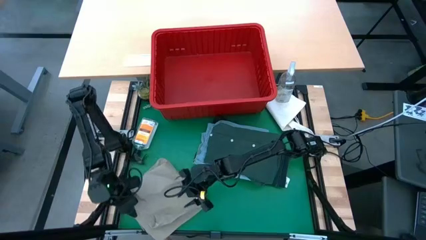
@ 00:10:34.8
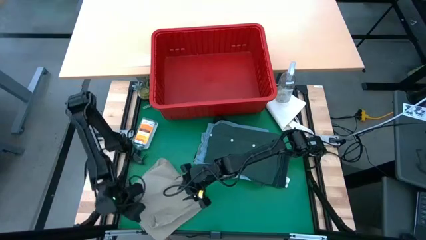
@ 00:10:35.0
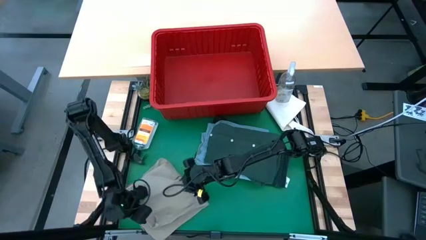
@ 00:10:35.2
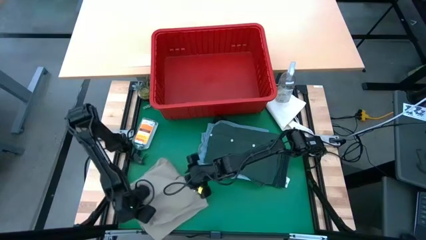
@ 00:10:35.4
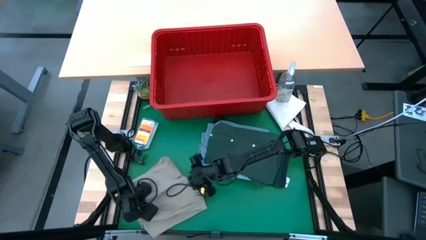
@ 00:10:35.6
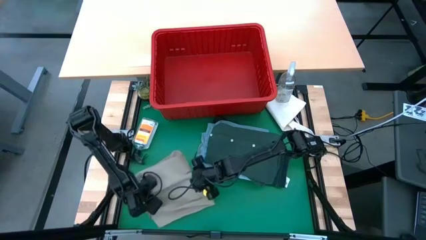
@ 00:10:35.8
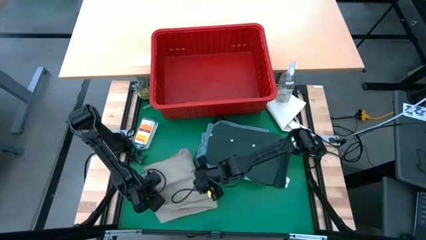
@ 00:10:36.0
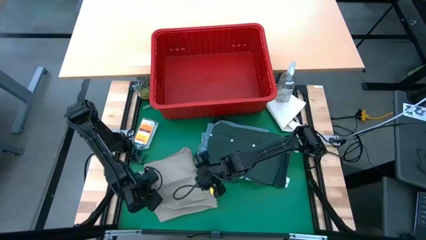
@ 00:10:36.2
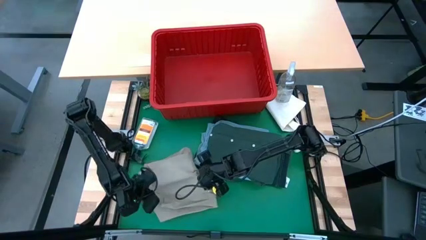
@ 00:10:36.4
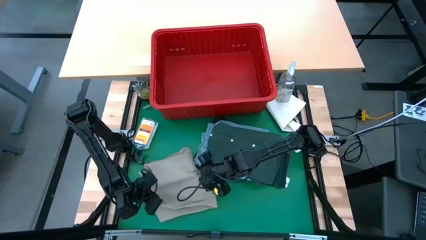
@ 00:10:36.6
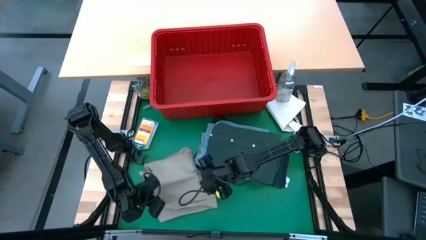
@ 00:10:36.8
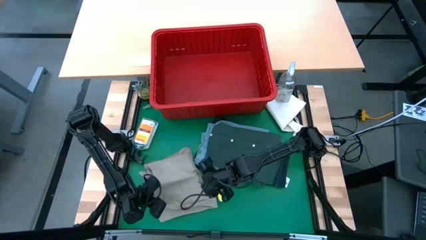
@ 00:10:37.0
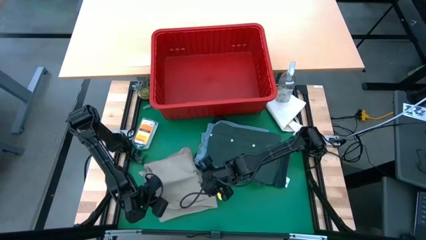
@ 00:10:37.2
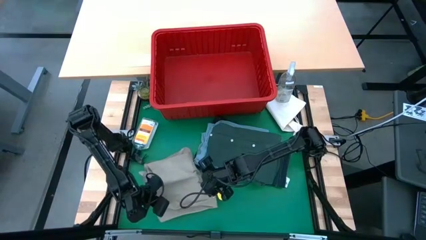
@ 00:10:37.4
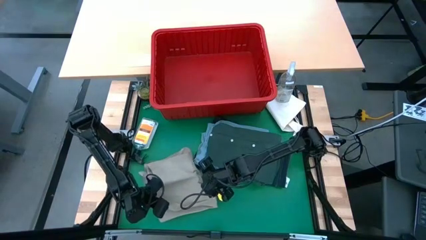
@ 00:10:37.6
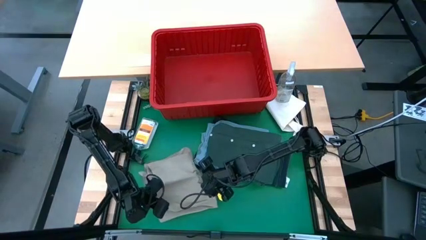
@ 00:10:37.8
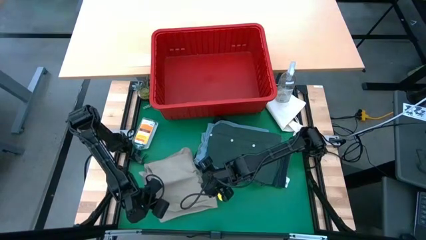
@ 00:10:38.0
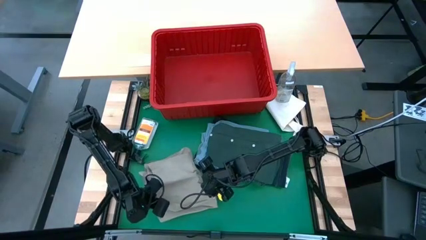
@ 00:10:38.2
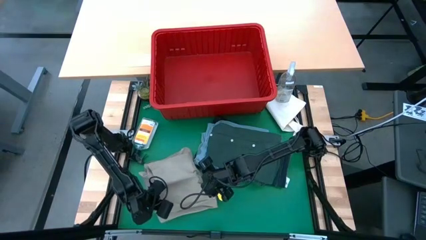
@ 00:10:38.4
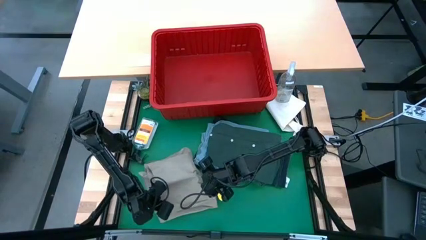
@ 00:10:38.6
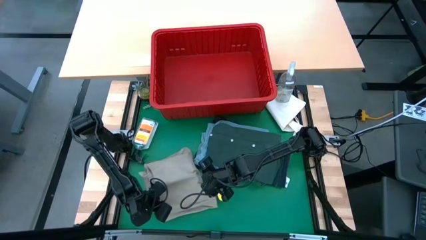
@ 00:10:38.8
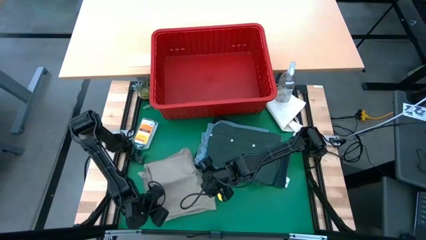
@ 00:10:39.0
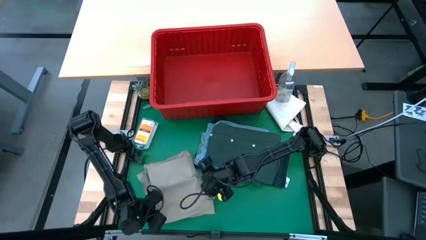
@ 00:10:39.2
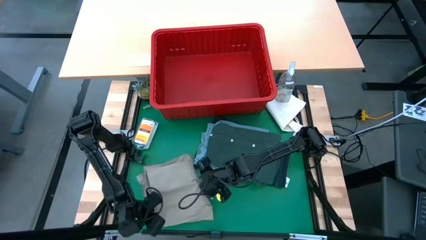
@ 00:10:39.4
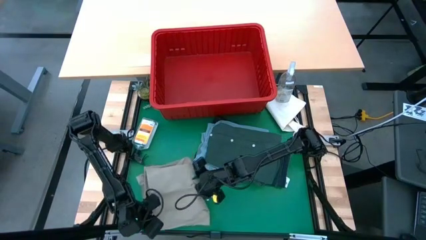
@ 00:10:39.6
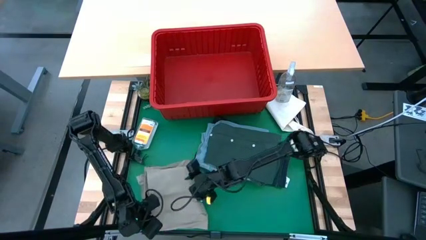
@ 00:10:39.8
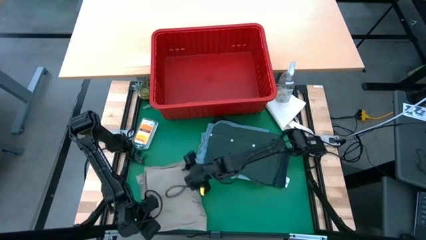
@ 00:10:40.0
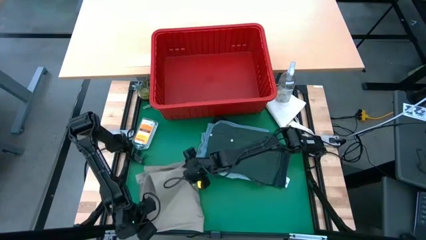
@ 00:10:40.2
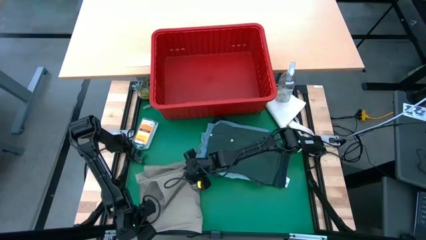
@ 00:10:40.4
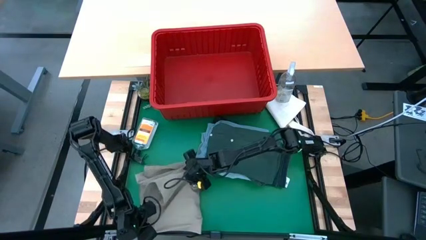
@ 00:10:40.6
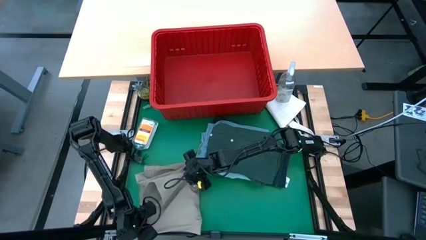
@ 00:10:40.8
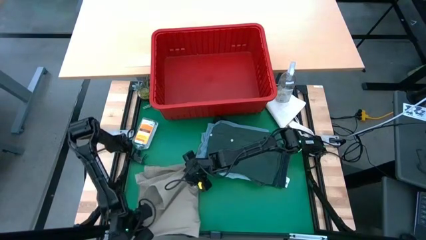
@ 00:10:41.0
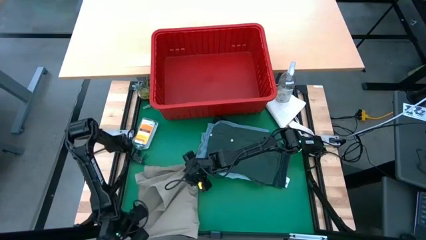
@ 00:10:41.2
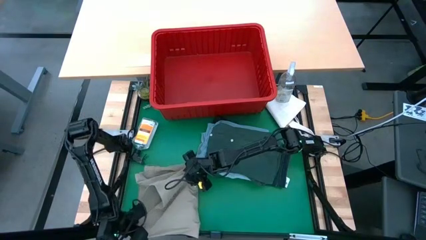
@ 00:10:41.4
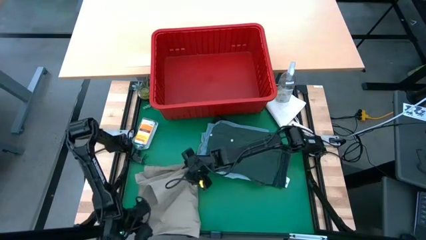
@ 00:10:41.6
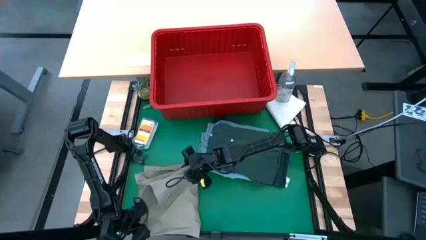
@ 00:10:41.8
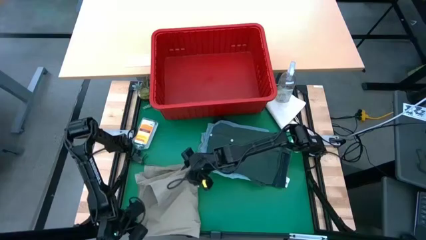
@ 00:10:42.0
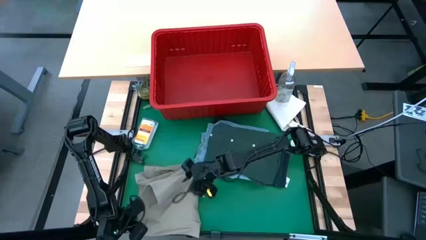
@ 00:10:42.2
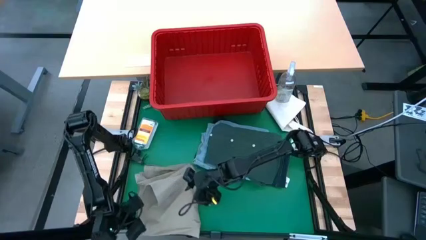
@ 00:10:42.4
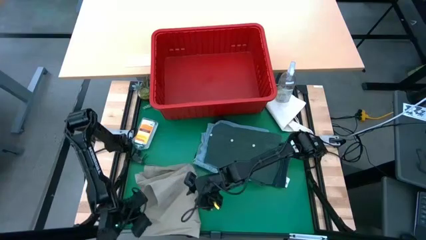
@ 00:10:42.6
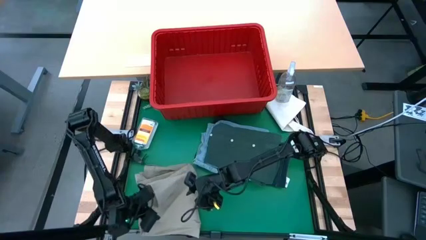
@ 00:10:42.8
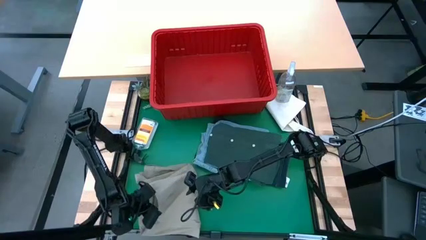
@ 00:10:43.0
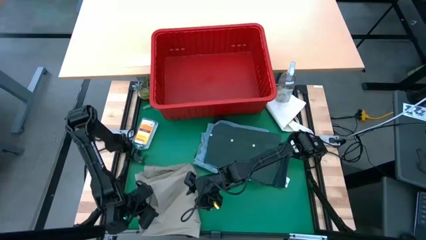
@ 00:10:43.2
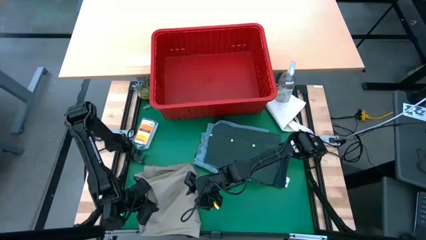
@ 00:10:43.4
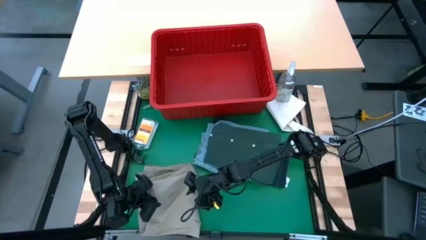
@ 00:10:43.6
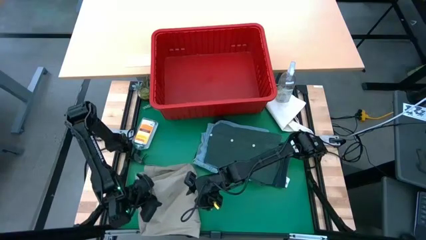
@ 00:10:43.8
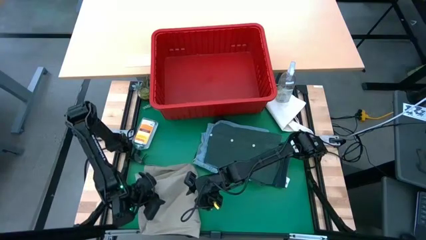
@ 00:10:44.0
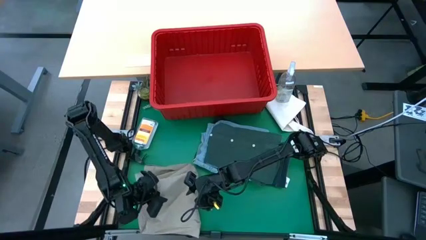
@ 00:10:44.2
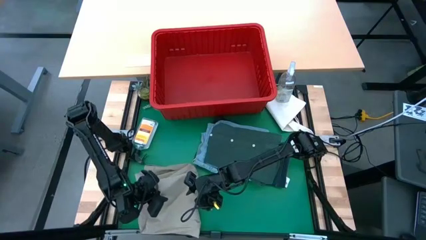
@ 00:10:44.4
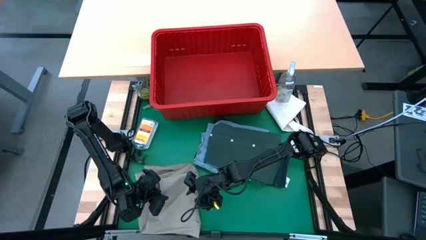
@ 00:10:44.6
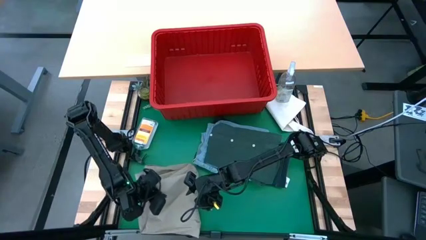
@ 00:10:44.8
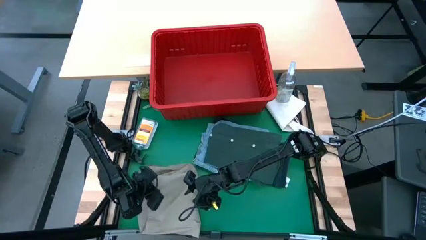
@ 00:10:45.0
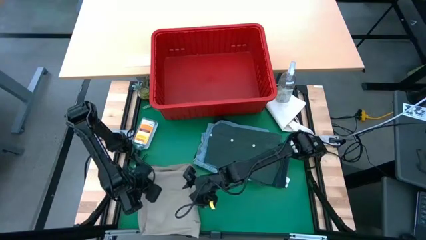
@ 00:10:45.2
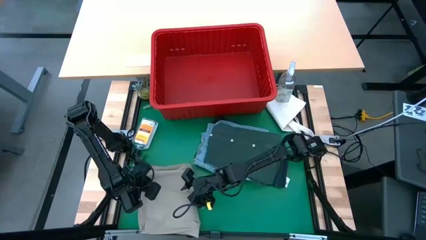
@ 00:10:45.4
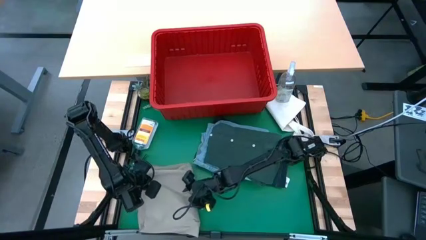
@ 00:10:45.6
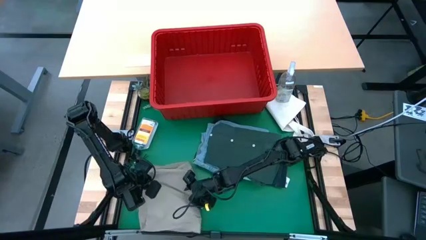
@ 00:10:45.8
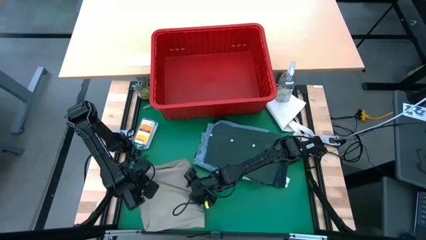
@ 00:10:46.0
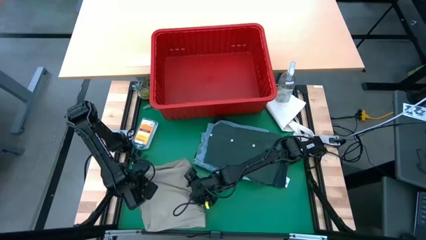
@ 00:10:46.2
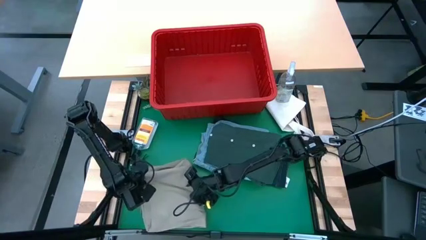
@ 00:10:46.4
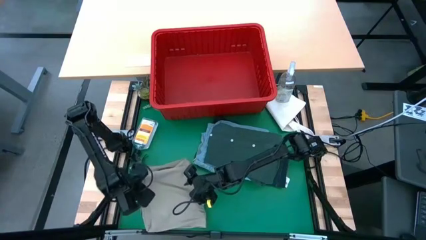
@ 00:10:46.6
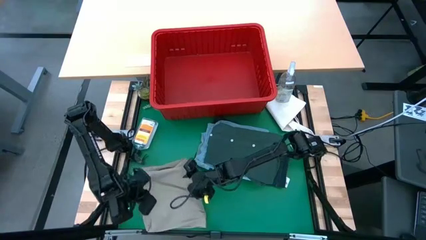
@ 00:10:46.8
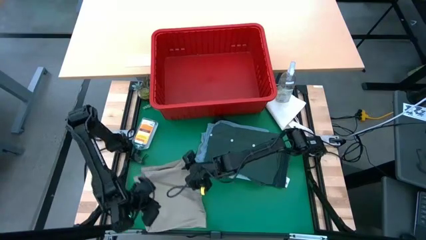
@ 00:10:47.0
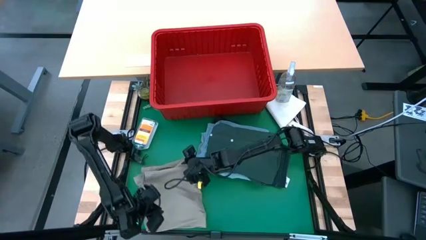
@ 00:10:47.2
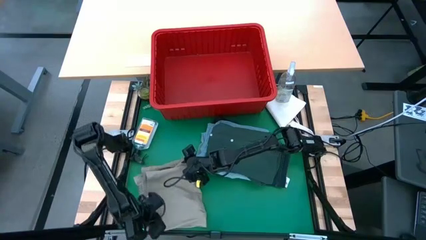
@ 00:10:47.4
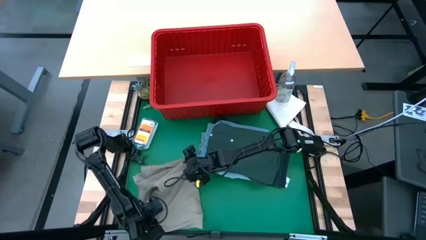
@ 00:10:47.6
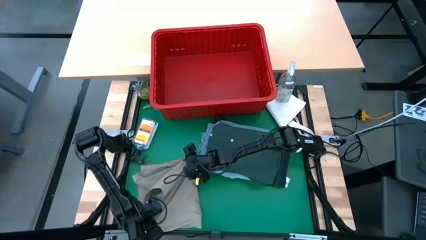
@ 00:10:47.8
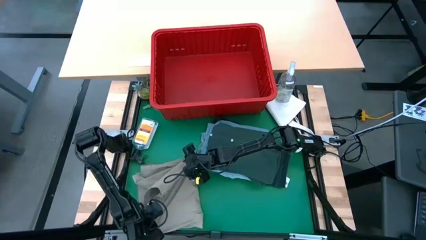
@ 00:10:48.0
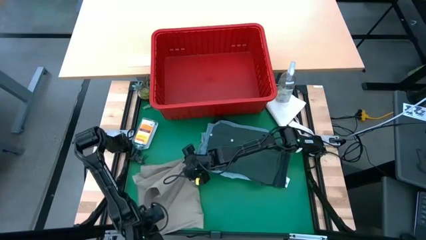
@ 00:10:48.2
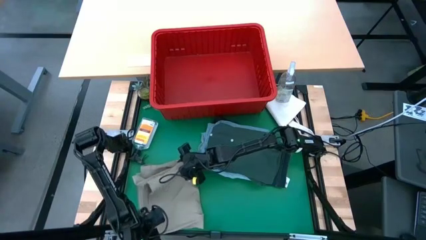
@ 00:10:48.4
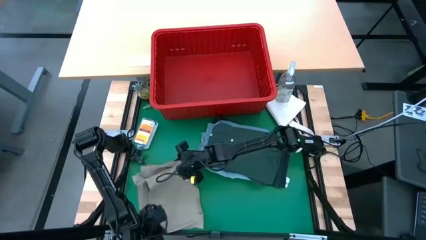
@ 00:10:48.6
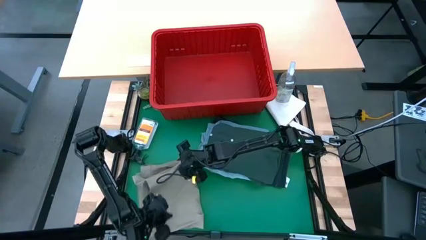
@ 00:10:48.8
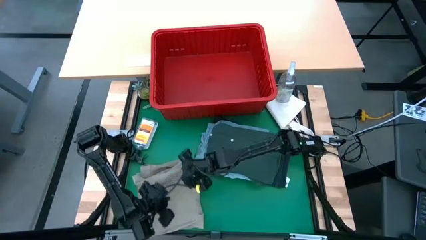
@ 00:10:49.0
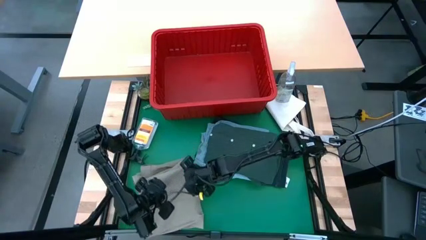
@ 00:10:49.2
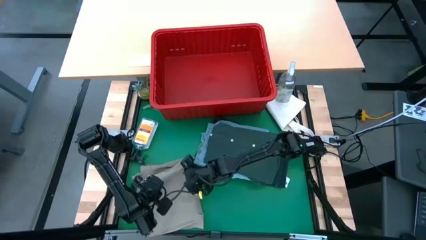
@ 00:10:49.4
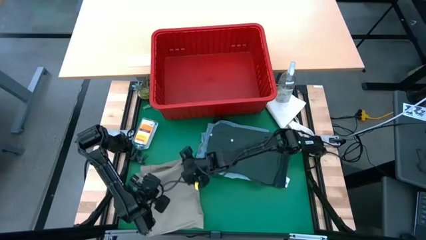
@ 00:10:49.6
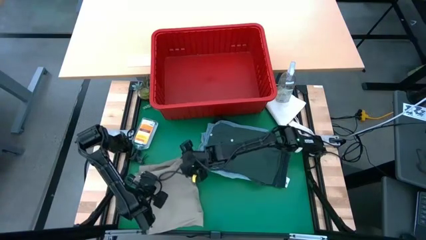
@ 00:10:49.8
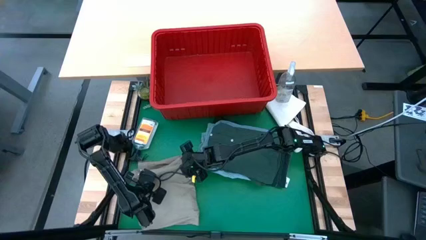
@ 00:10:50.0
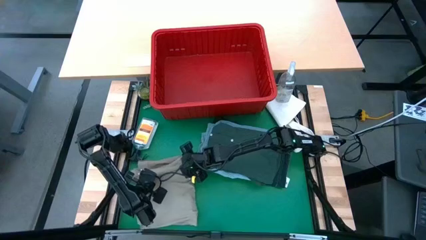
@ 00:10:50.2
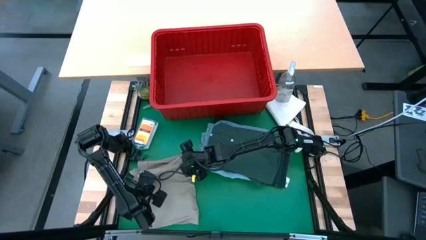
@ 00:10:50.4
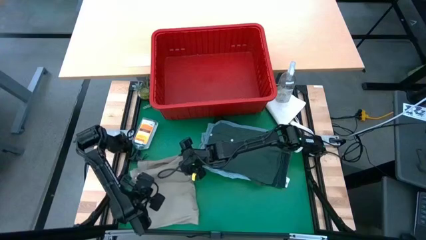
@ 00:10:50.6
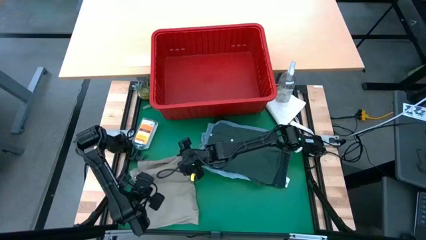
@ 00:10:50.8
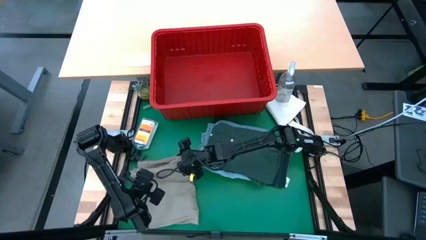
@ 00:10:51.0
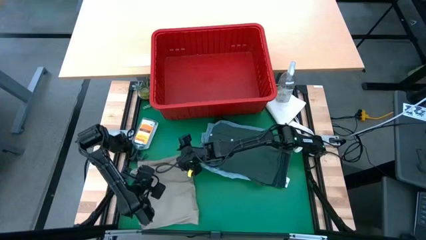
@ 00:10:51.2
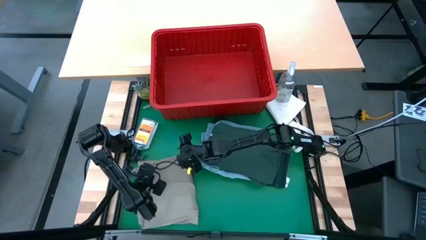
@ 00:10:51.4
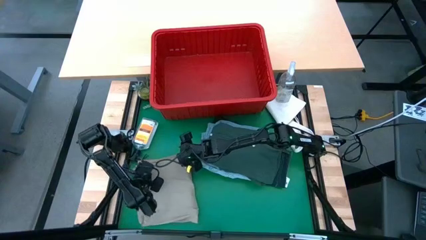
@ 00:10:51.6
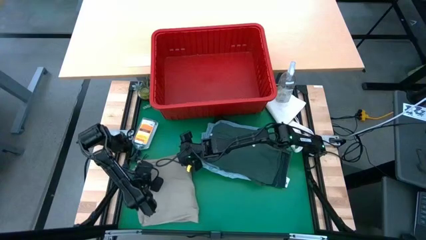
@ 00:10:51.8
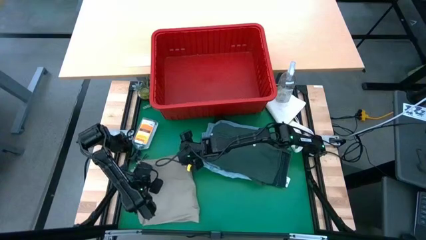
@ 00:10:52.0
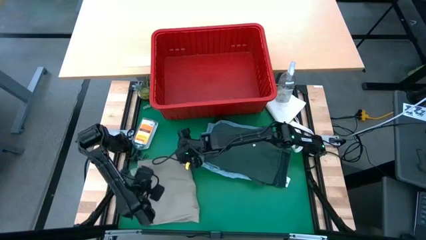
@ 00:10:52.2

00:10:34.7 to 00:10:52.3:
Task: Fold laundry
Fold the beige shorts
